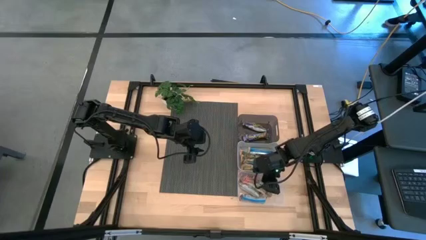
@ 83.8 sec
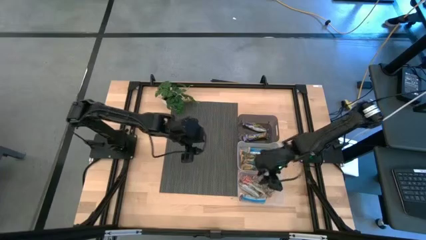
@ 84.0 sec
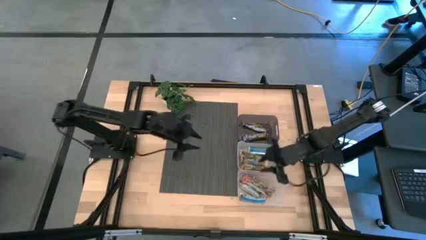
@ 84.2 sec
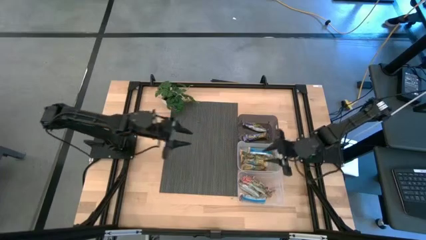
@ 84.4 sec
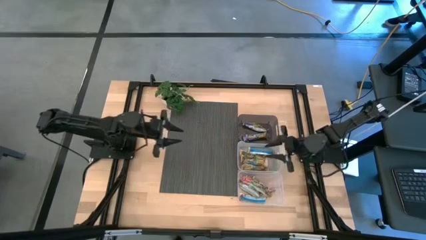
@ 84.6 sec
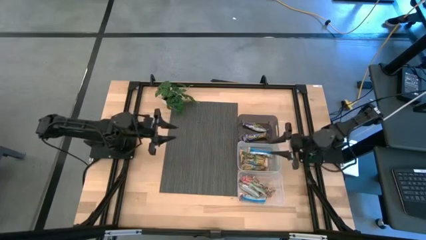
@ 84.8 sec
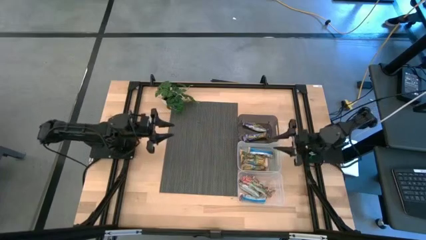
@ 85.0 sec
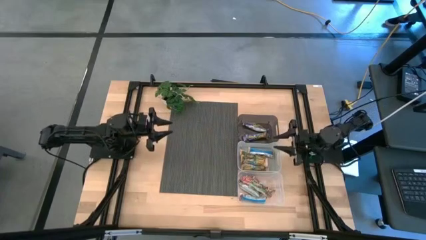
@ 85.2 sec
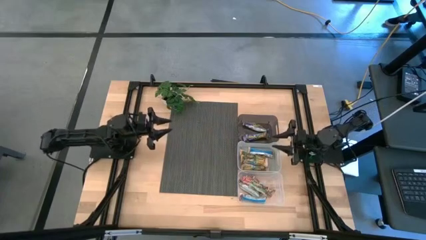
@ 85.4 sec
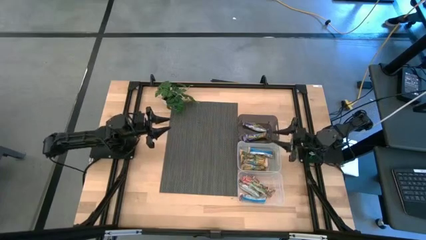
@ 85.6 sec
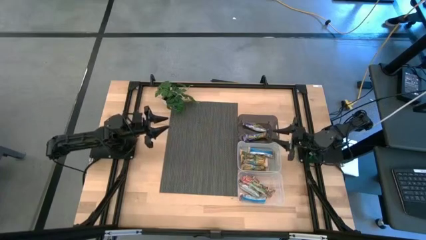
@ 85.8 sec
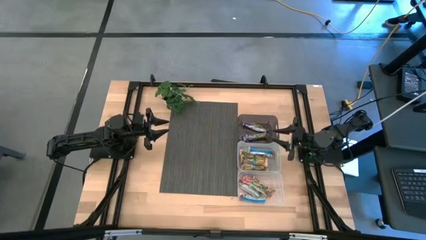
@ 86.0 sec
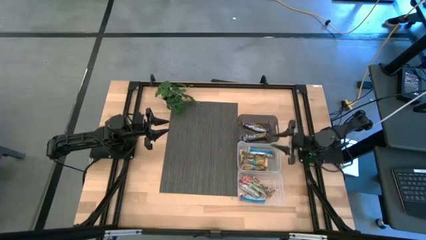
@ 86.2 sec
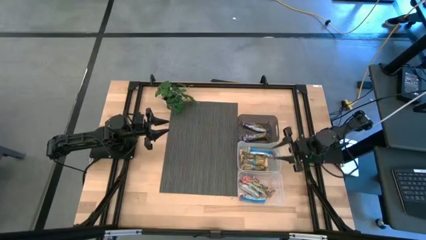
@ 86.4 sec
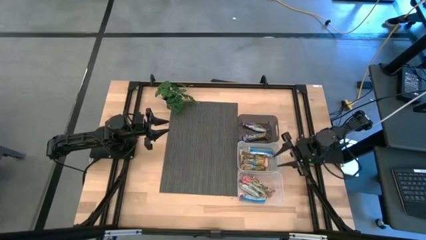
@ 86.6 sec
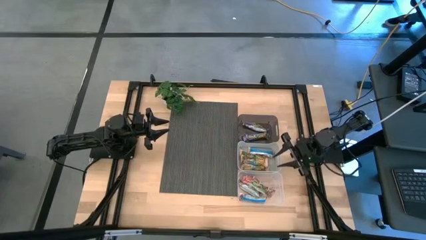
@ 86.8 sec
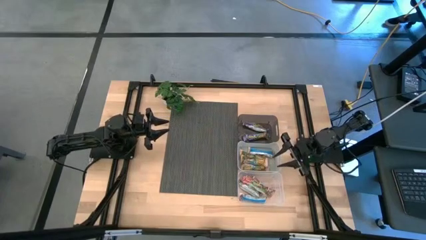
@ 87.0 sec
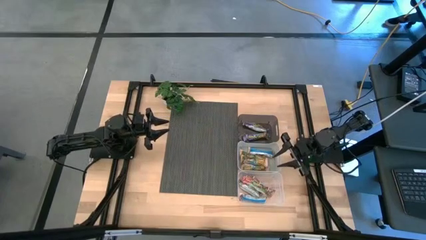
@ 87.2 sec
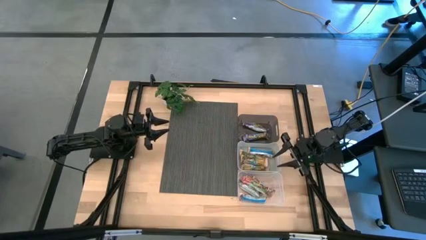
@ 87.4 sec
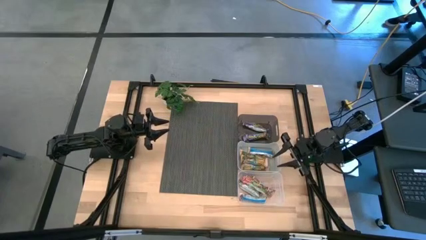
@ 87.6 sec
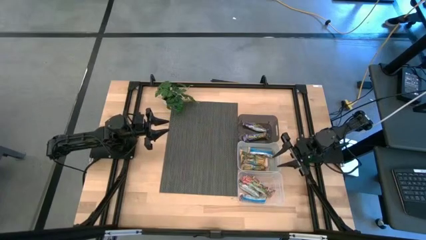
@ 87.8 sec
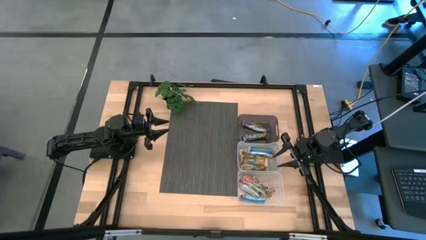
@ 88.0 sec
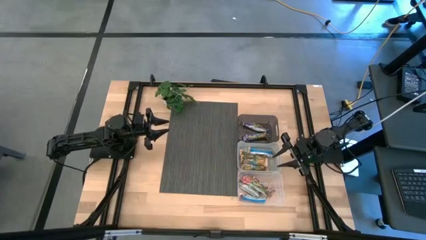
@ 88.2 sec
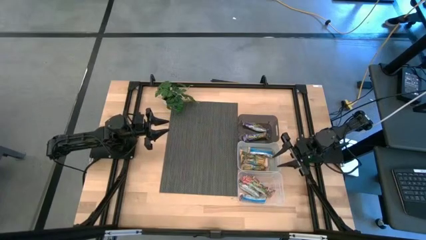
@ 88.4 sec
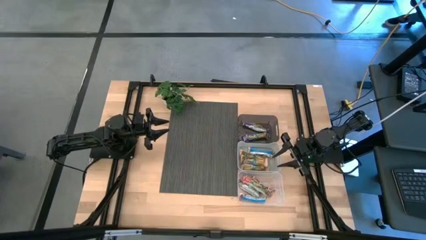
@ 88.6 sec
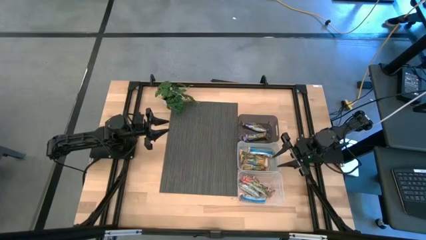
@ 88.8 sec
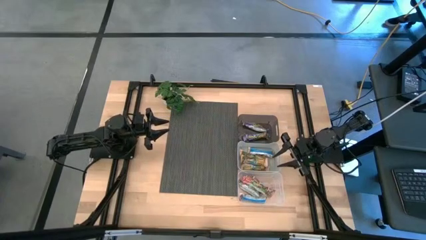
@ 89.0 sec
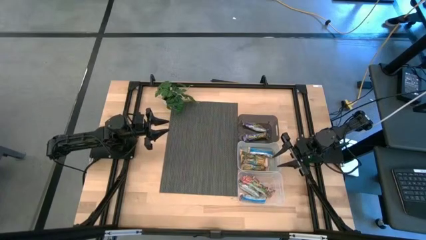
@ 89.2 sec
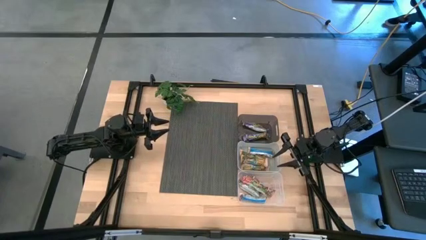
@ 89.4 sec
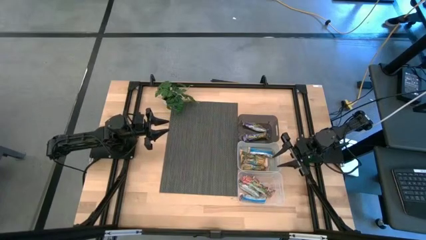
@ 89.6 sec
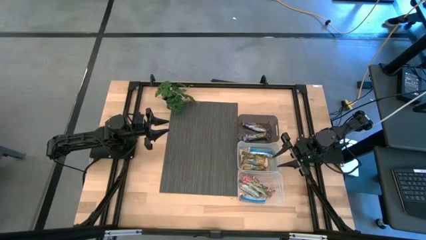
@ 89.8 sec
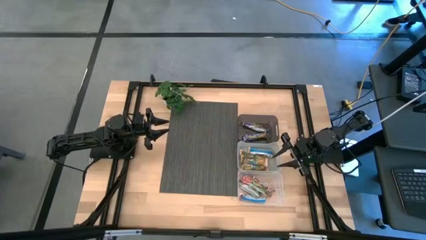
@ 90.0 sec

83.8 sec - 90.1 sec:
Task: Pick and place Granola Bars by type
Return to Home Position

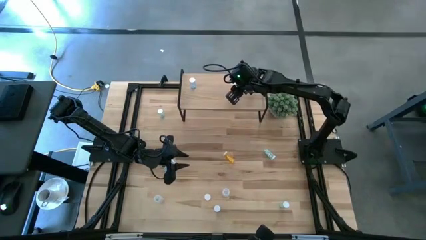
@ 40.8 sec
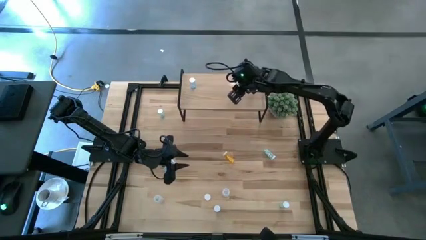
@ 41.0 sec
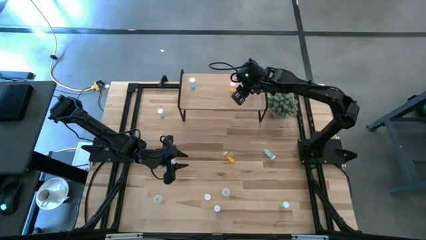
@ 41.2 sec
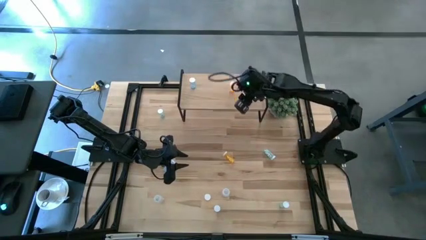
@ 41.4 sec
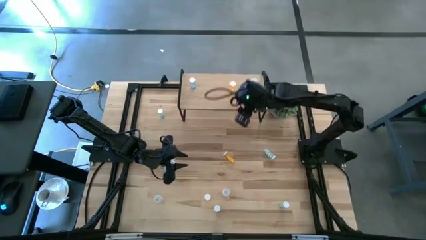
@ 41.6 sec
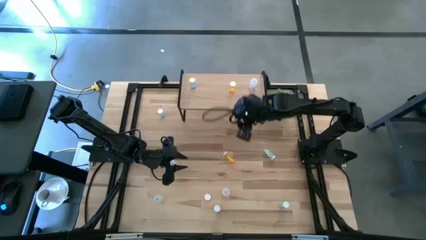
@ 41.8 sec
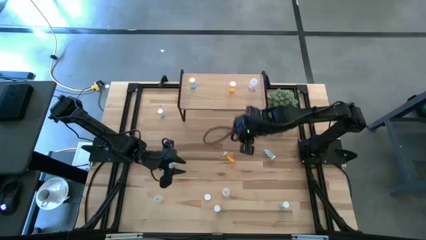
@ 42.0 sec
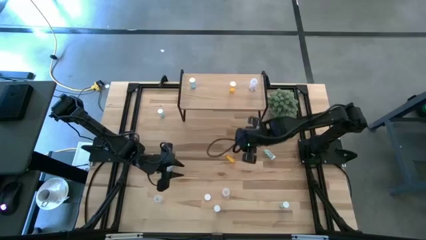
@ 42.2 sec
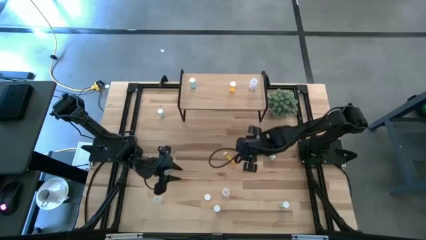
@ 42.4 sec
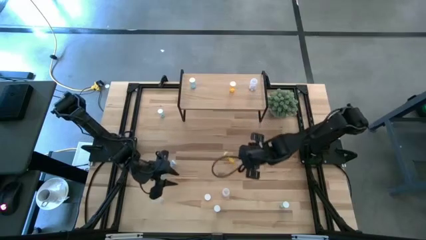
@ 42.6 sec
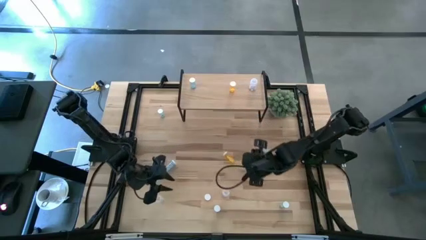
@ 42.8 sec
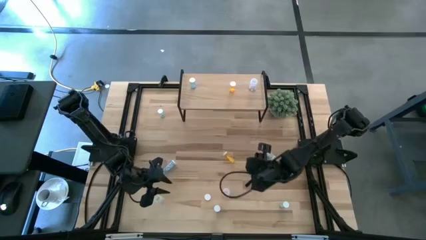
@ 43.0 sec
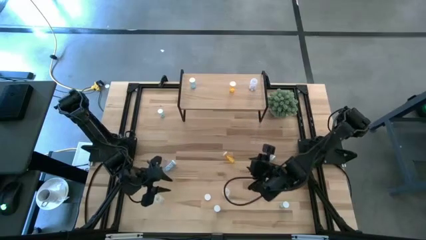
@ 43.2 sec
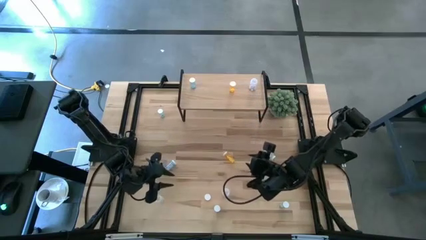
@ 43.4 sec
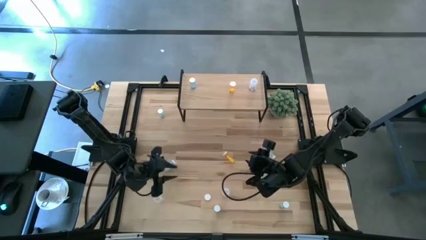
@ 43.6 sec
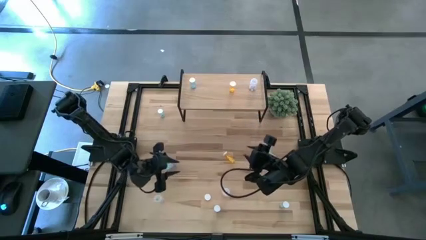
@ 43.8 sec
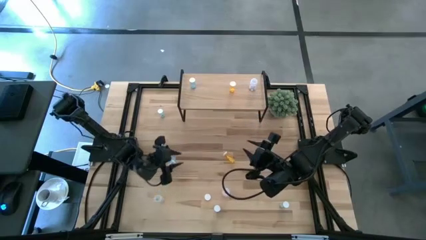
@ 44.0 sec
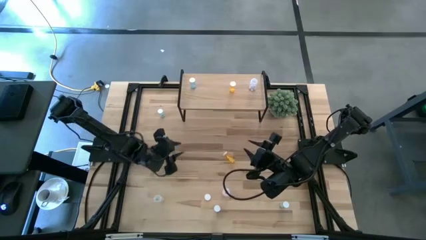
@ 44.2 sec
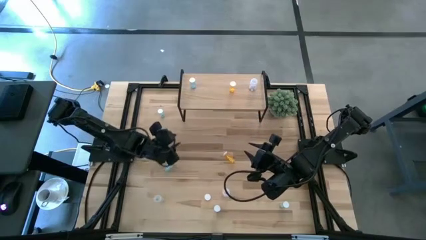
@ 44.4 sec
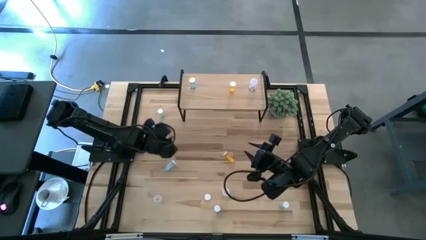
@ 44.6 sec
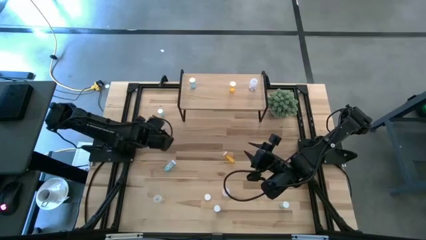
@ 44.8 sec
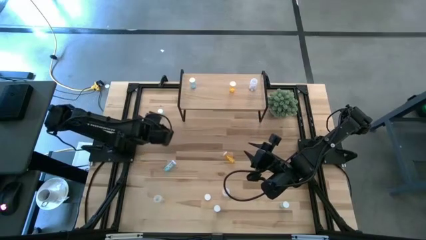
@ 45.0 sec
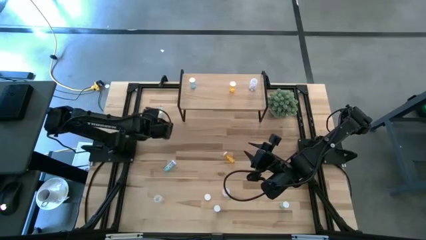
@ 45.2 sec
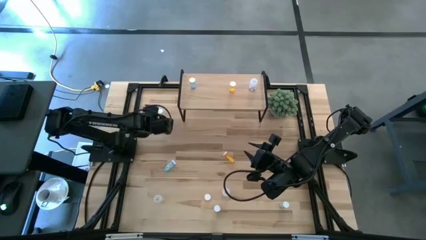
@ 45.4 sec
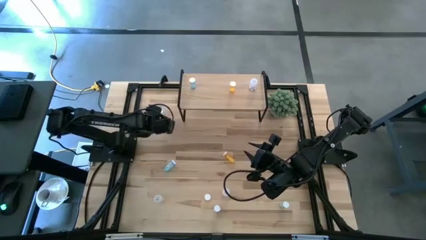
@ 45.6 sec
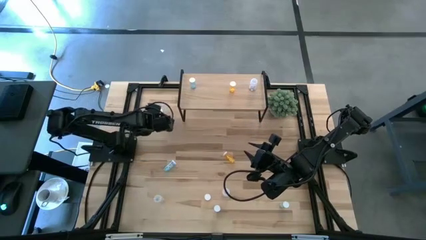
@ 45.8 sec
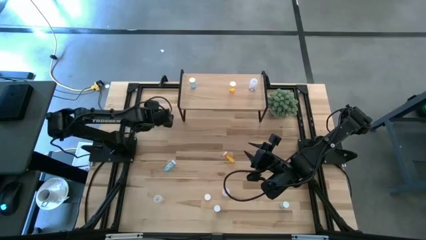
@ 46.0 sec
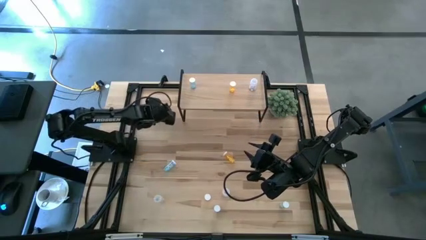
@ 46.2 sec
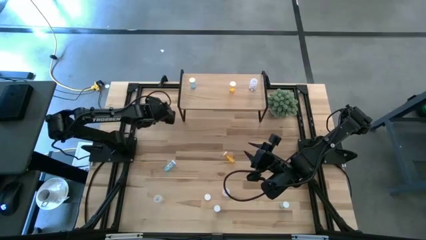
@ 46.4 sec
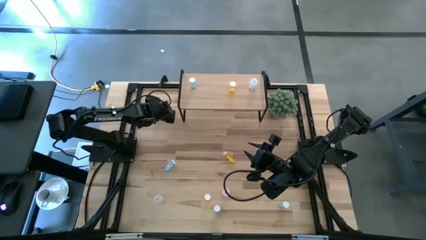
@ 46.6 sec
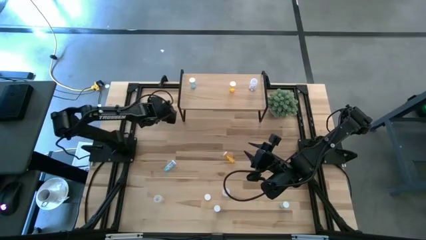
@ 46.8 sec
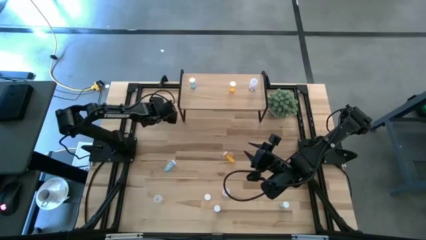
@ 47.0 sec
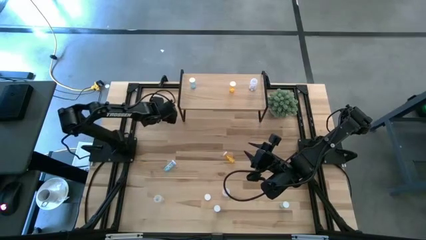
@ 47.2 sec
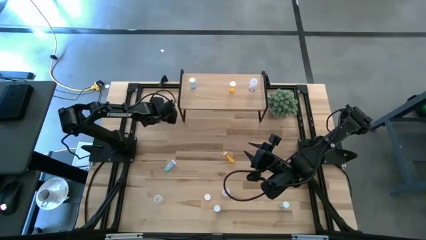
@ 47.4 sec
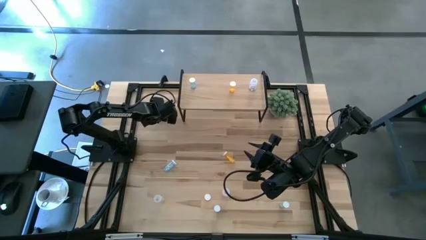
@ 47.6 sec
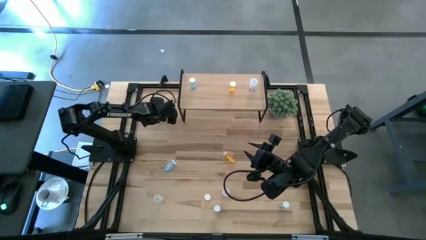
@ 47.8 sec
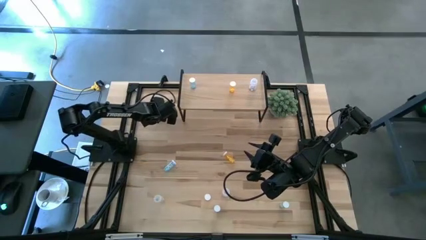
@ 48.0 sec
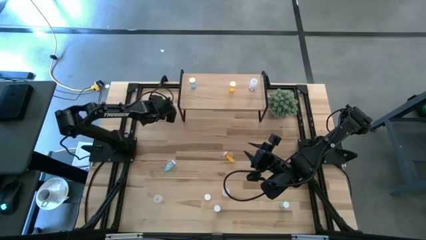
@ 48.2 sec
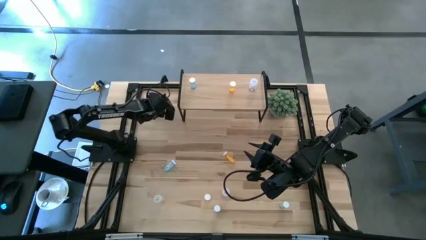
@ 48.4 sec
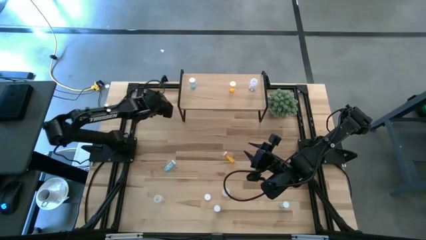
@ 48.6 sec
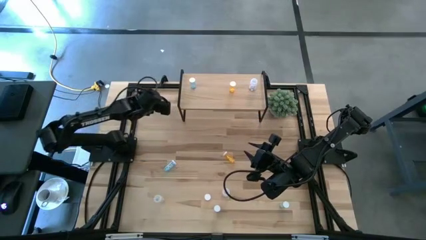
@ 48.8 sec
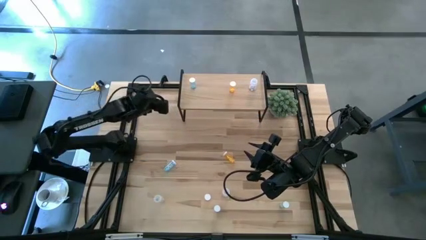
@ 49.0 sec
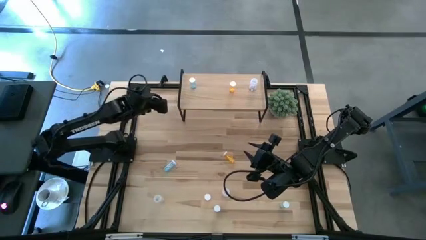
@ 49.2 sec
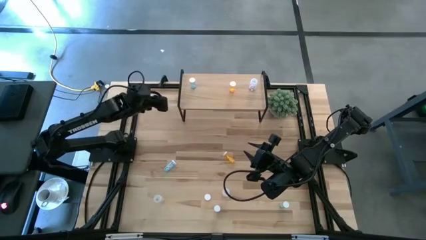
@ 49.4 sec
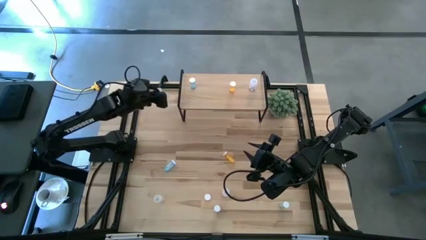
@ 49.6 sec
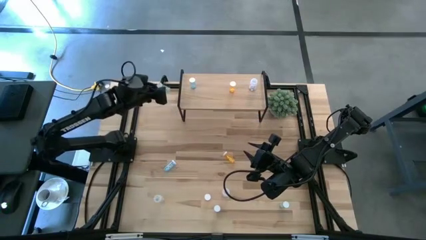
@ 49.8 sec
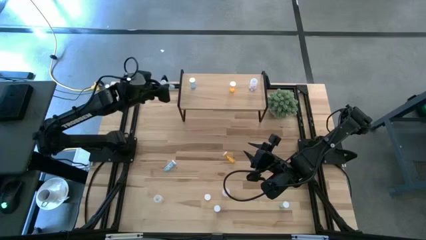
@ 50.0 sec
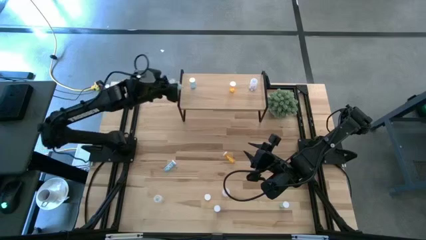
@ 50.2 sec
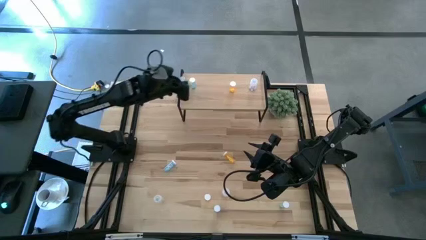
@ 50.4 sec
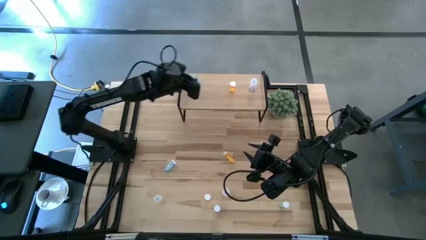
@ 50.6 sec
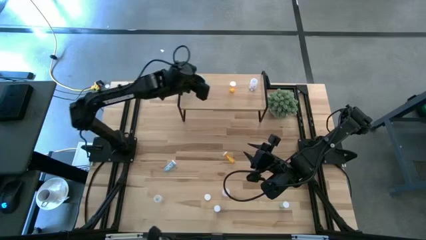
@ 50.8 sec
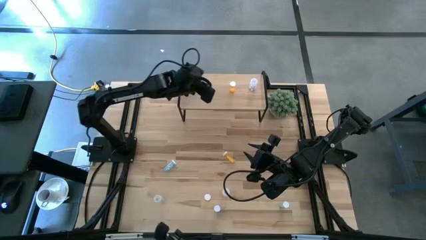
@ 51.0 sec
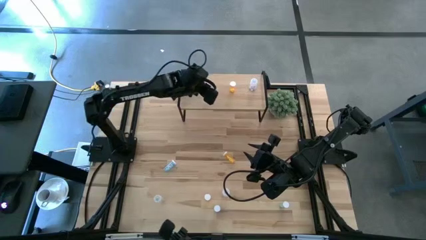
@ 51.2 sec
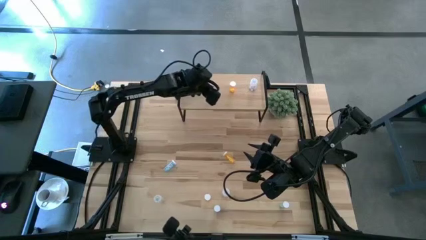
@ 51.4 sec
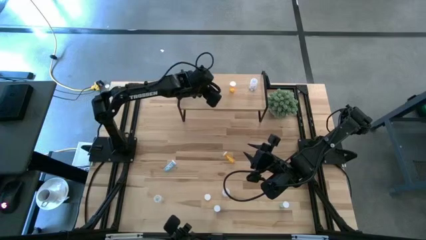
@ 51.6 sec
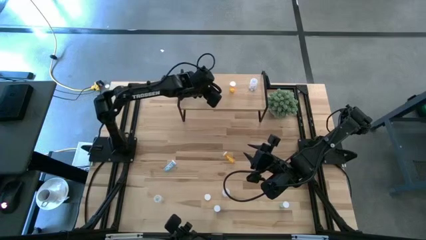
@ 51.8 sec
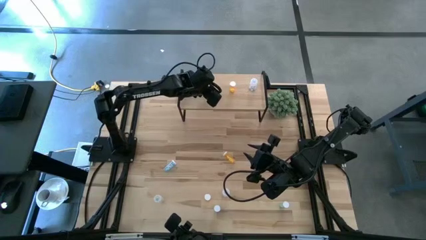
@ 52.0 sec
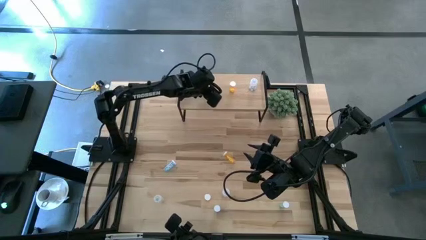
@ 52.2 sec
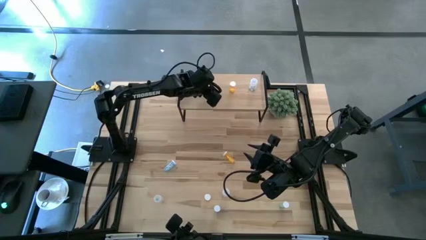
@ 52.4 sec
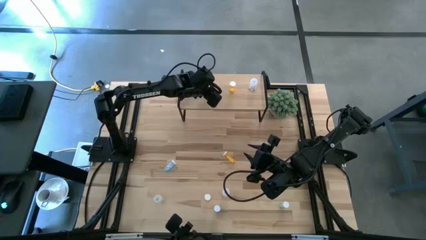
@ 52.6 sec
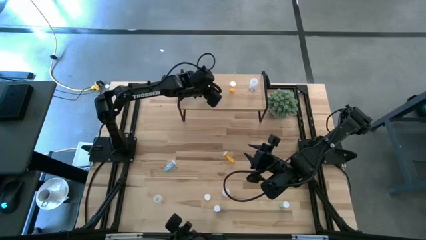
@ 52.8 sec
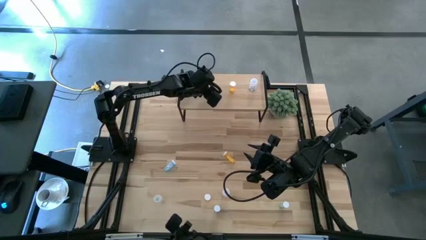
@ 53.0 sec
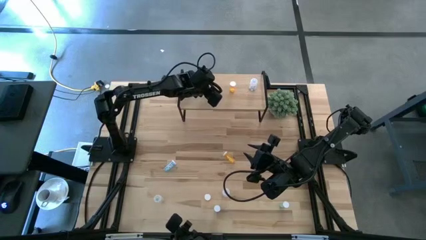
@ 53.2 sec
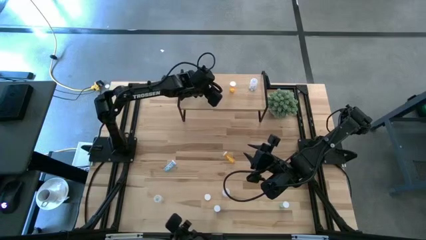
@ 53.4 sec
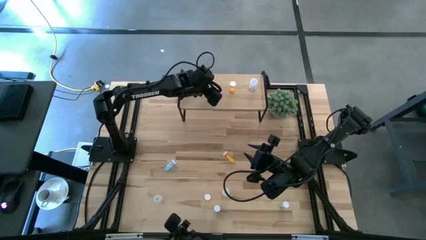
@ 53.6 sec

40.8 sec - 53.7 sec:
Task: Pick and place medicine bottles onto shelf by color
Put the top left light blue pill bottle on the shelf
